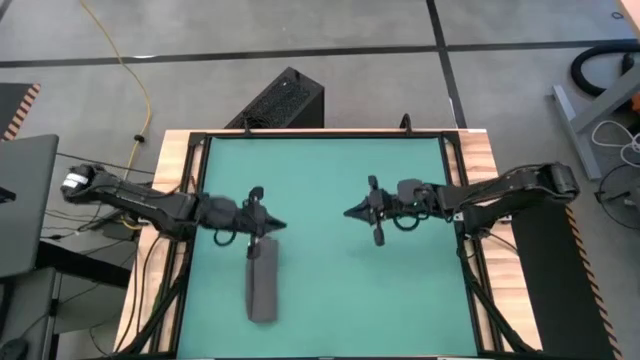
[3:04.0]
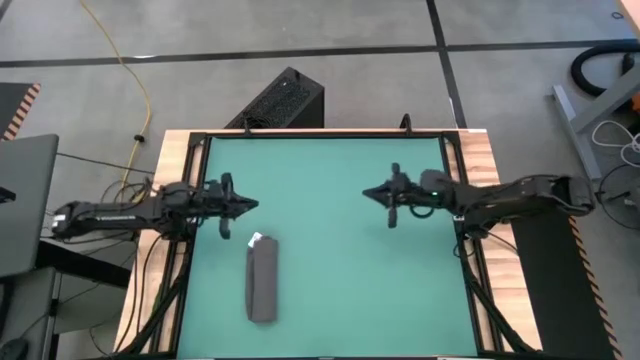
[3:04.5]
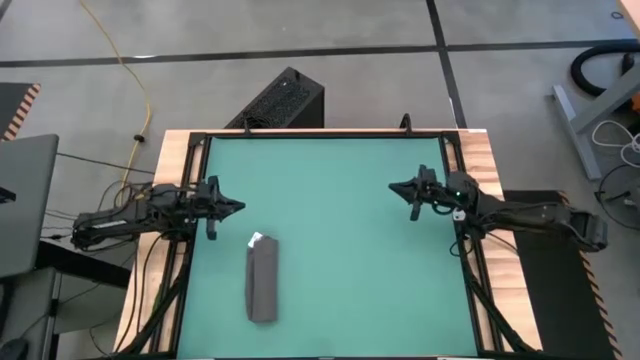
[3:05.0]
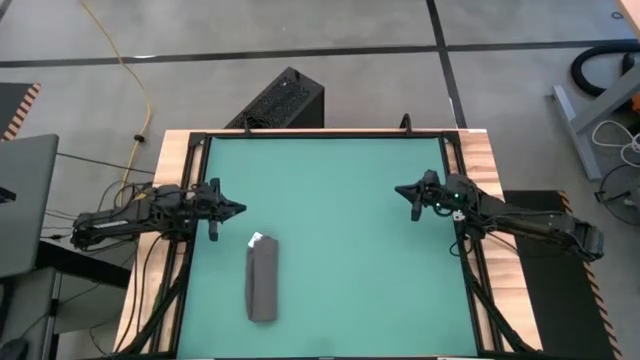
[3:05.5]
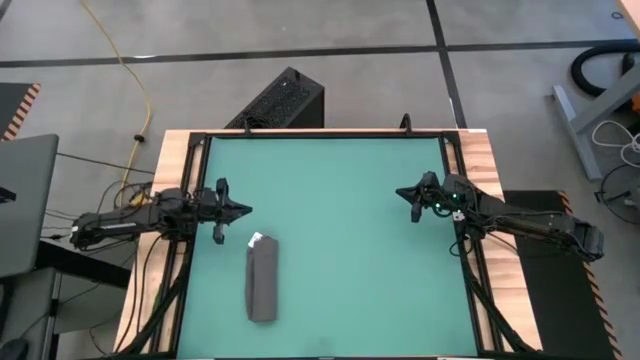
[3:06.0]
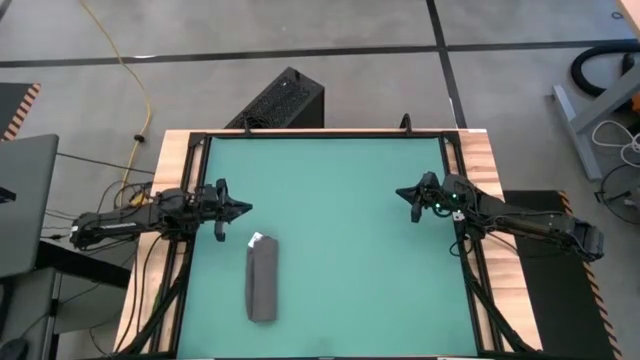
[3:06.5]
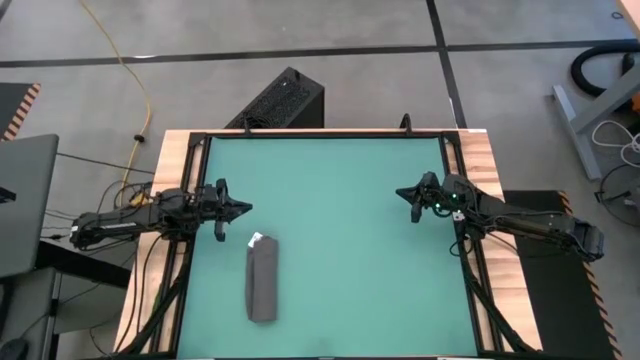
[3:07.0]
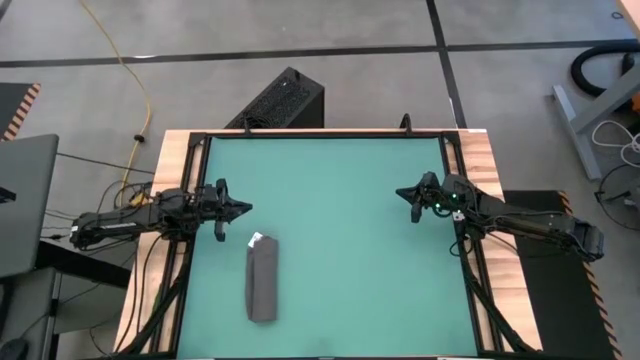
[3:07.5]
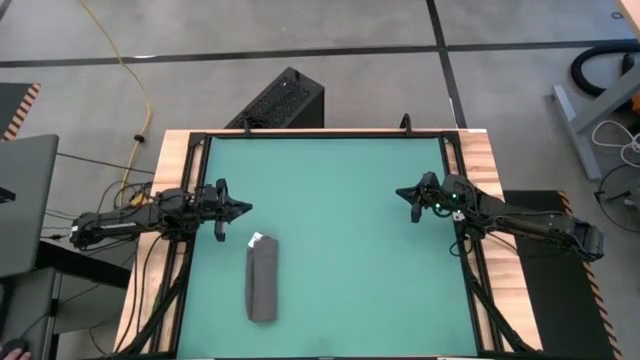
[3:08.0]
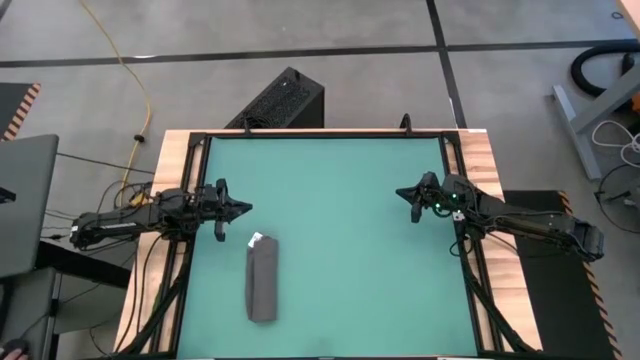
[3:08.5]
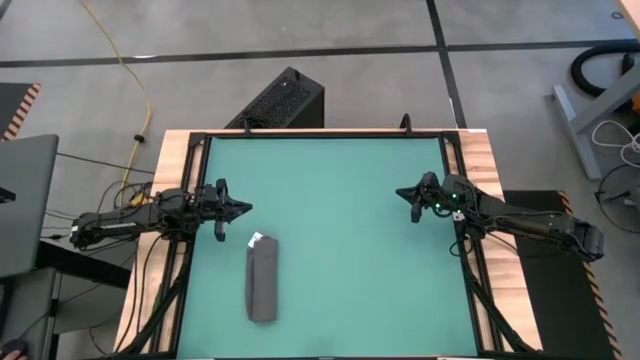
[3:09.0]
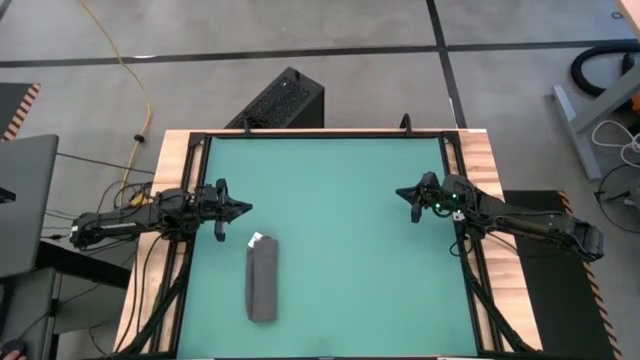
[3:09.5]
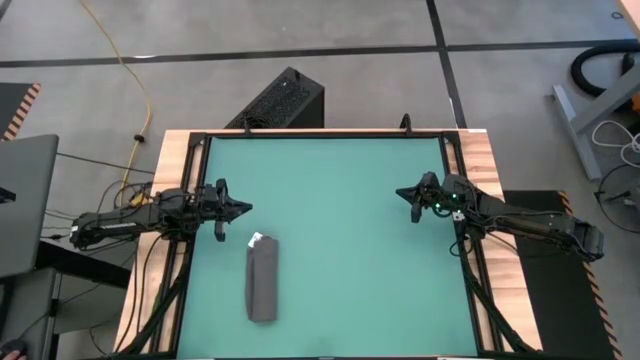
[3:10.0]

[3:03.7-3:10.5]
Task: Roll towel into tight, uniform cylinder
Return to Home Position

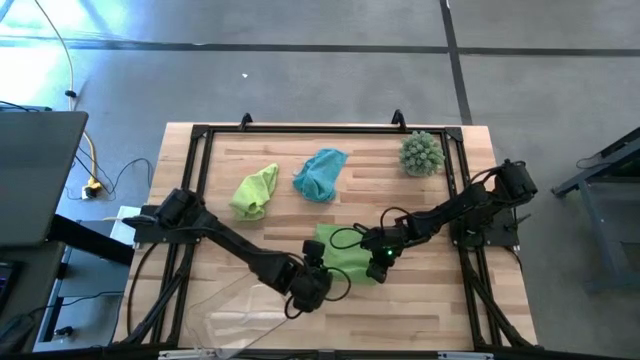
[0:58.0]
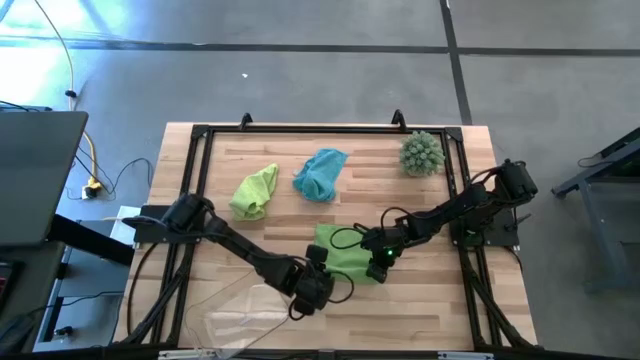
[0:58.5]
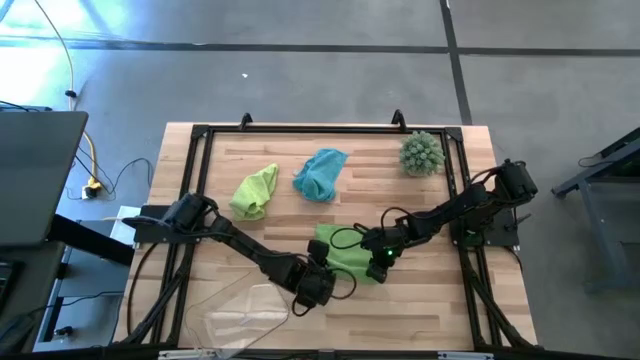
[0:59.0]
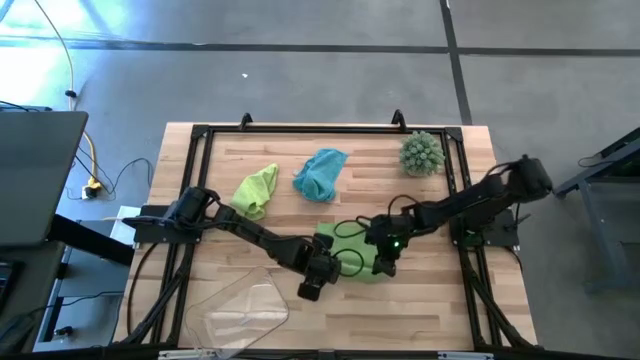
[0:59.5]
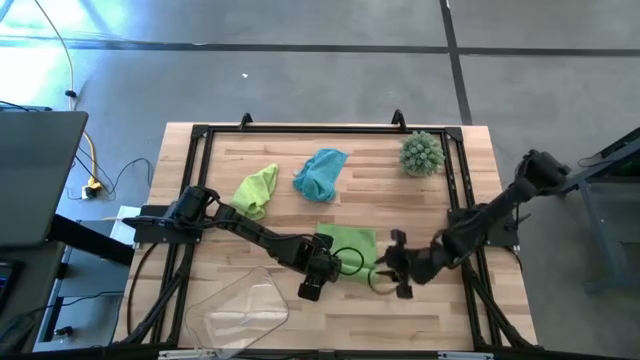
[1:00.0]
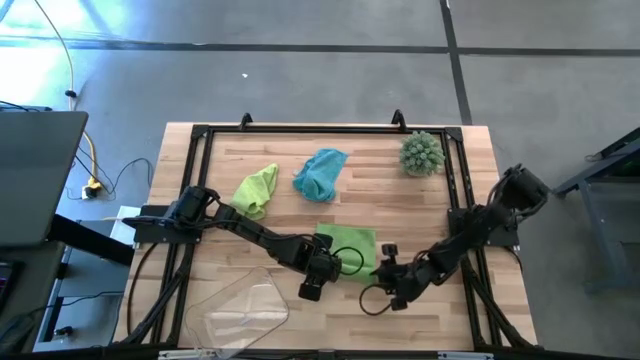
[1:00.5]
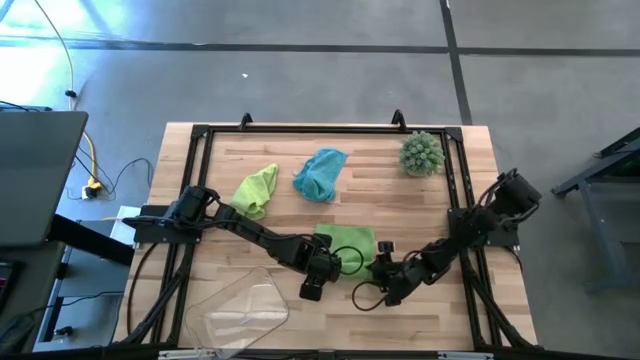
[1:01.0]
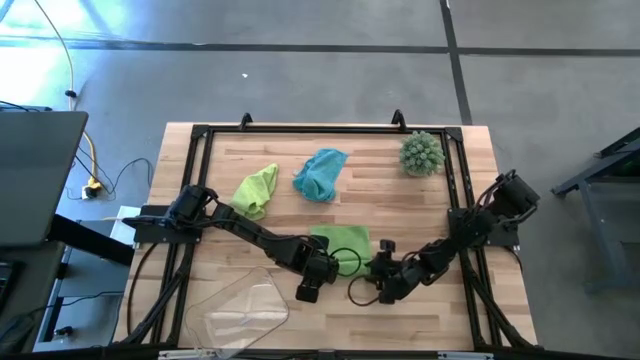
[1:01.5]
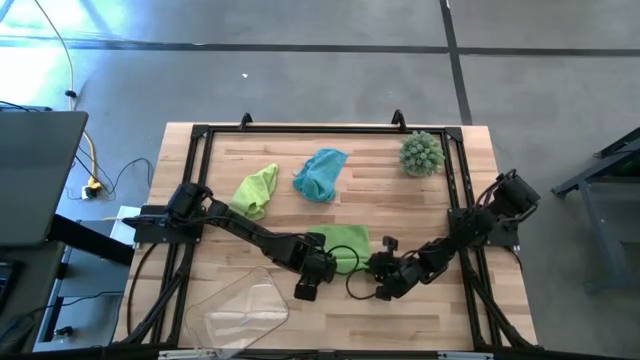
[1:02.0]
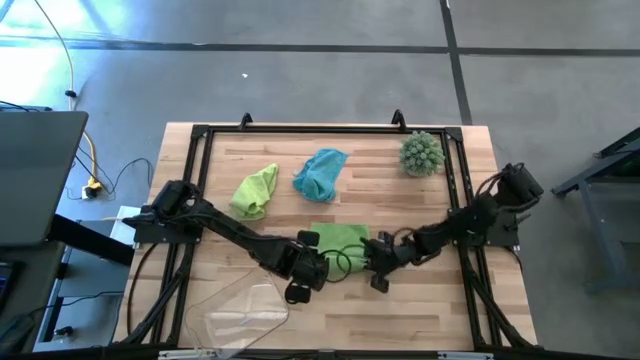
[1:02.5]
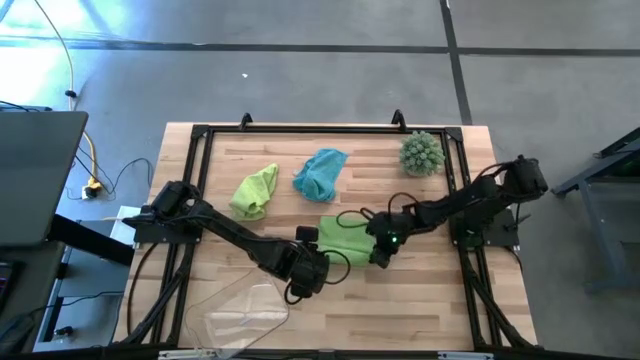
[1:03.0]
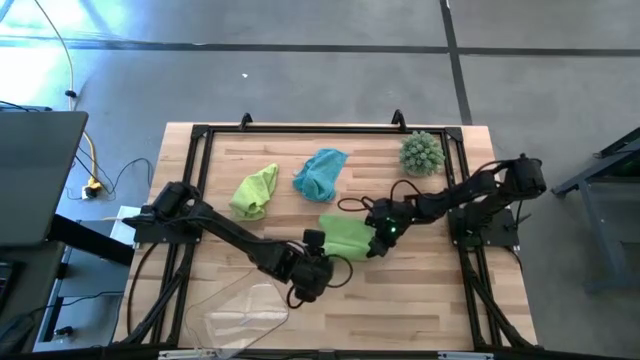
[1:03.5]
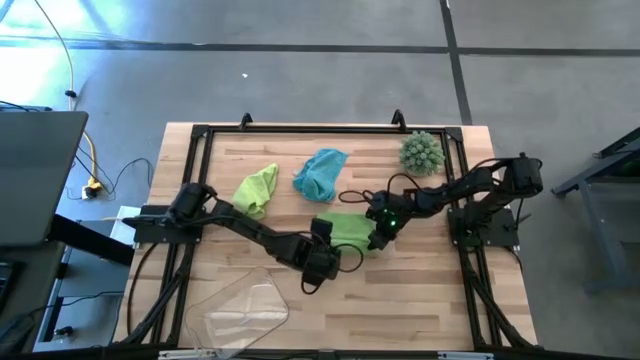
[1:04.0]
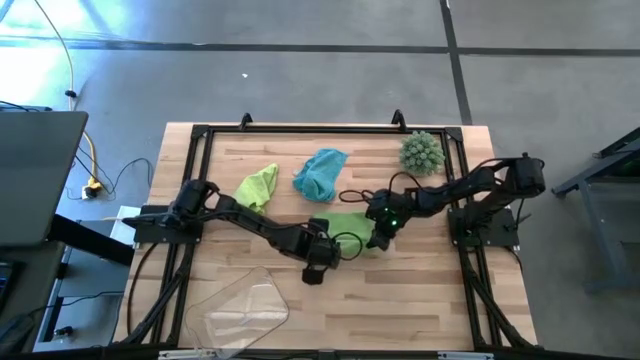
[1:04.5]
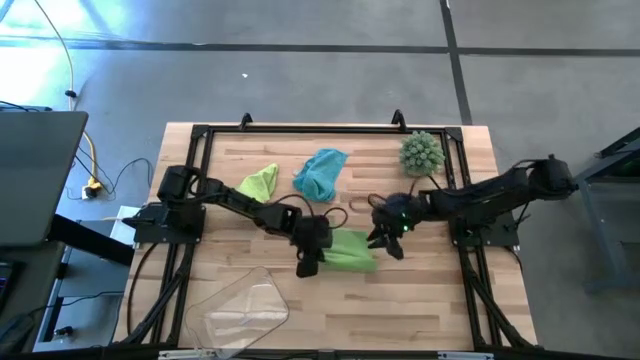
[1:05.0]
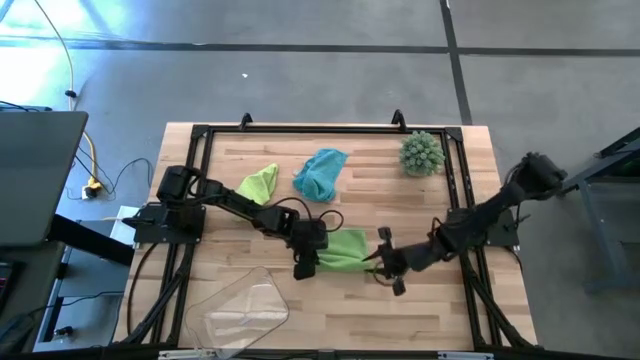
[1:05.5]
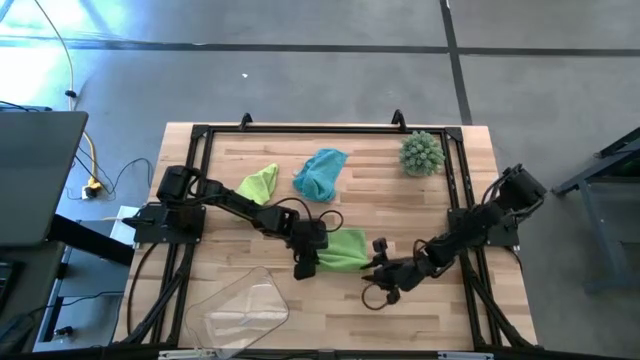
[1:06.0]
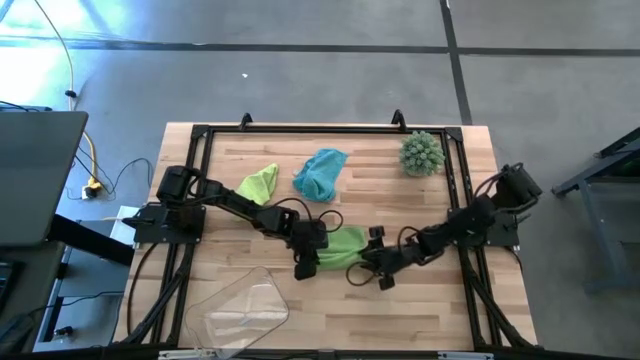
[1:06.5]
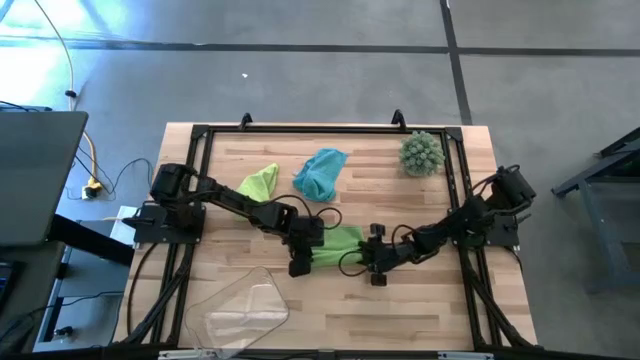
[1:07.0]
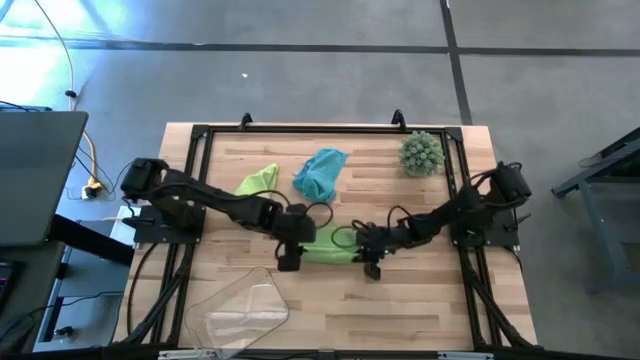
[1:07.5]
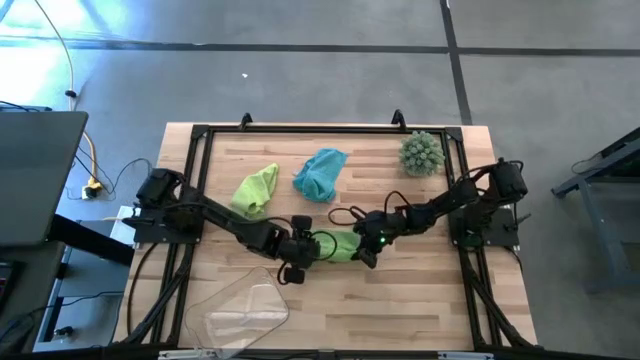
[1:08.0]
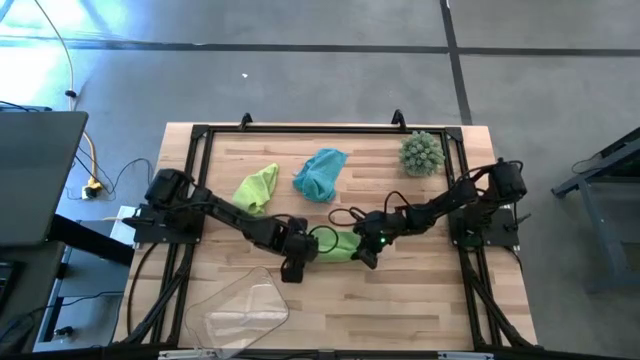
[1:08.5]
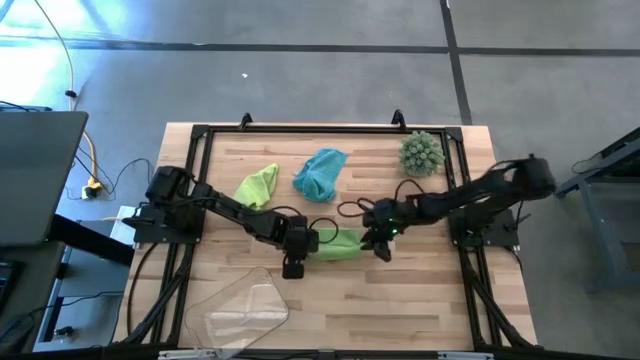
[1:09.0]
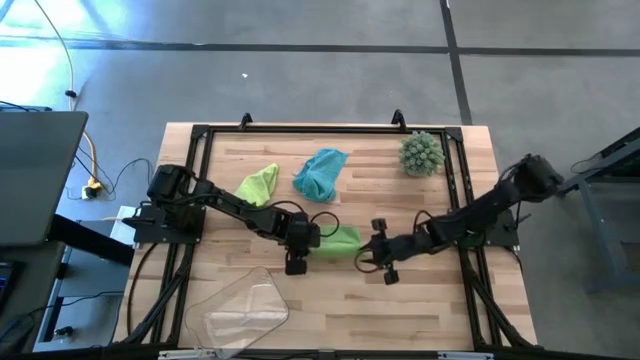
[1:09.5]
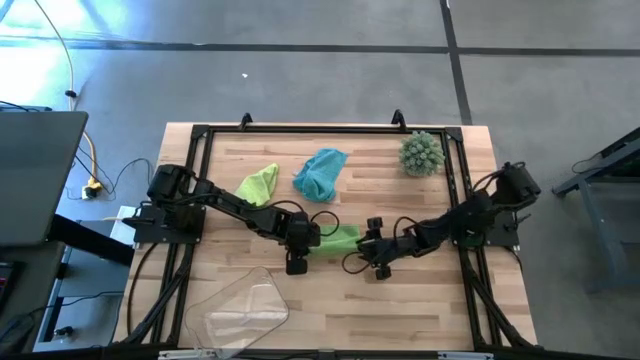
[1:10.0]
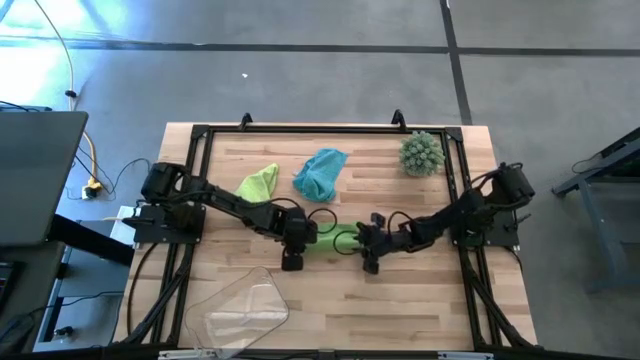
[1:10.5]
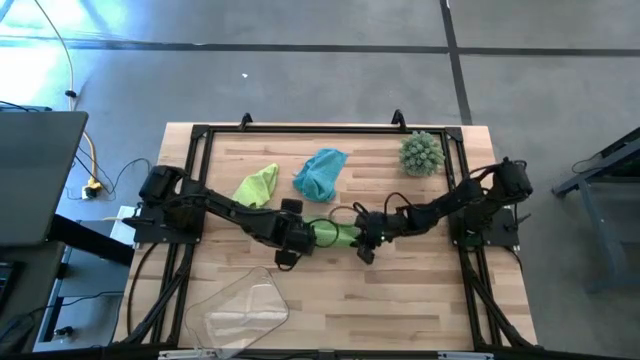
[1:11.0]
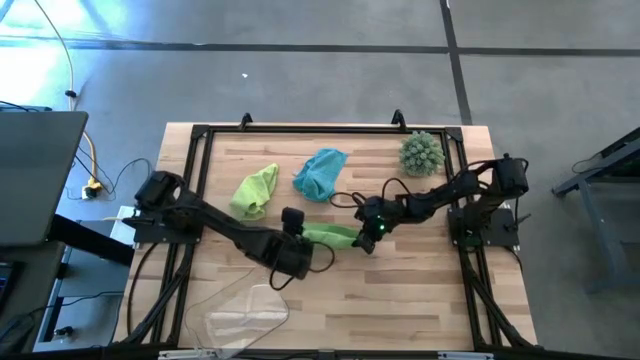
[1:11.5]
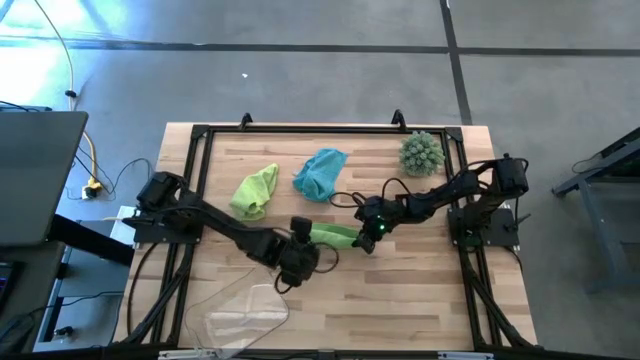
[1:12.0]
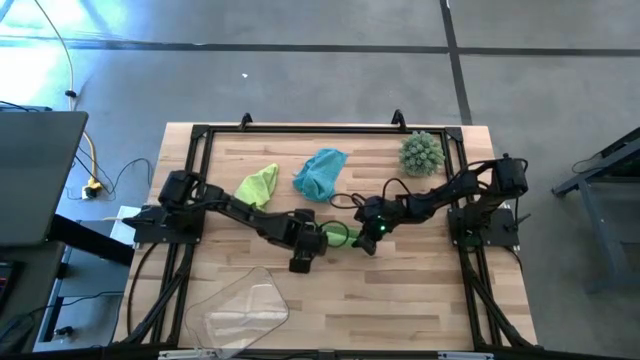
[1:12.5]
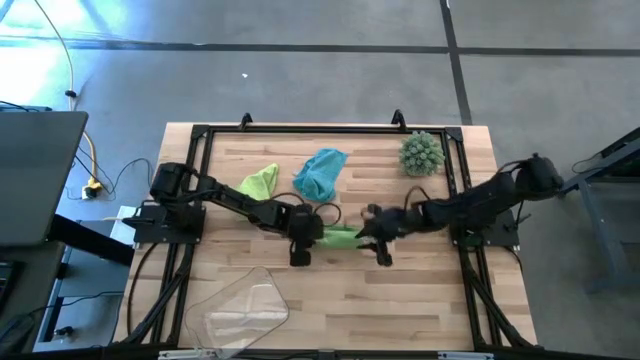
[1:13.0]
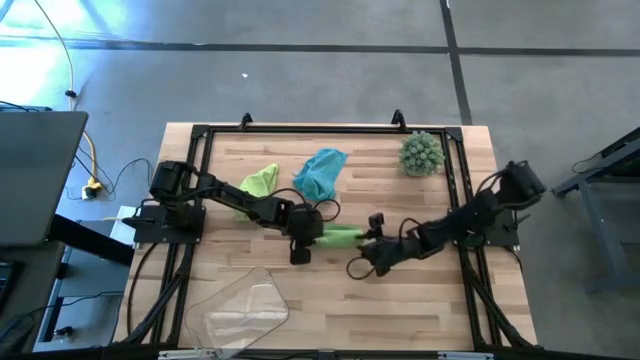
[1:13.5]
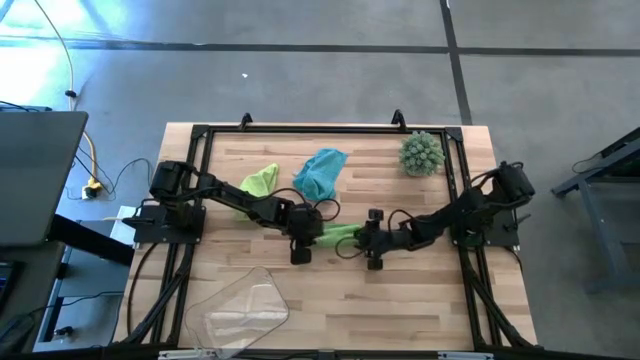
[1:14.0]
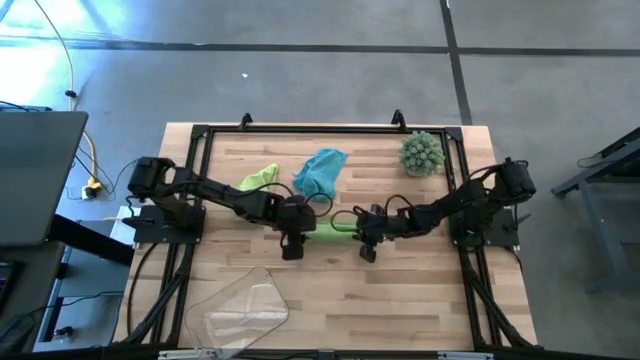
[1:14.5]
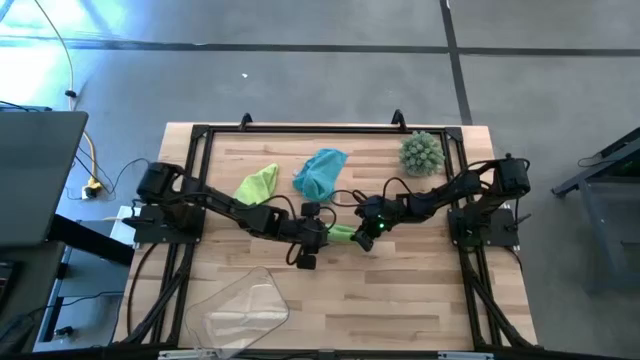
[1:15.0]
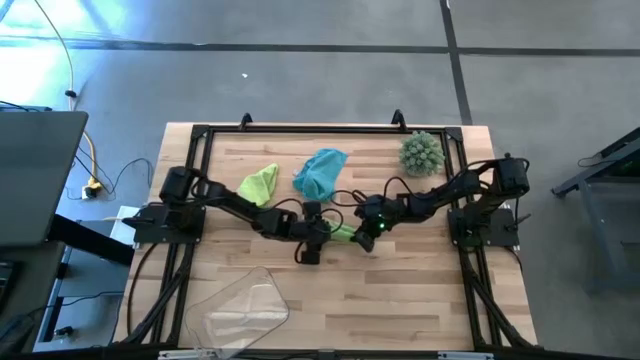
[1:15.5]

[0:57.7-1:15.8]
Task: Roll microfiber towels into tight, uniform cylinder then place into a basket
Roll the green microfiber cloth
